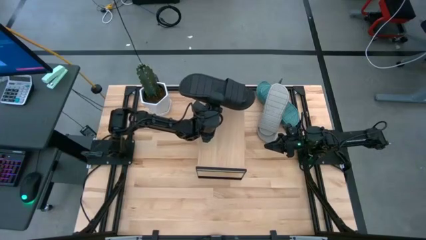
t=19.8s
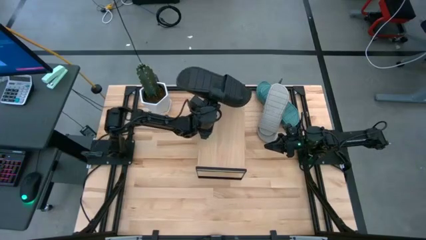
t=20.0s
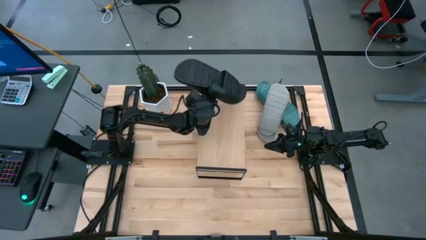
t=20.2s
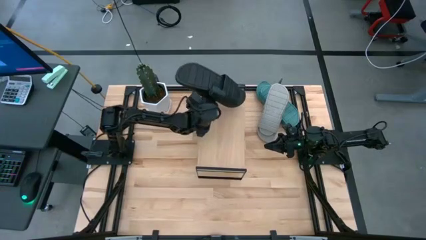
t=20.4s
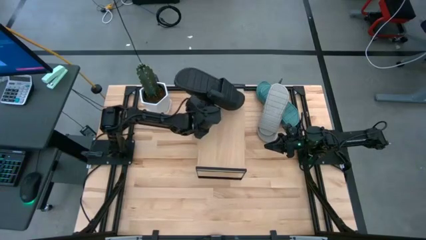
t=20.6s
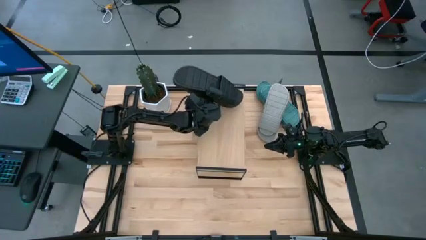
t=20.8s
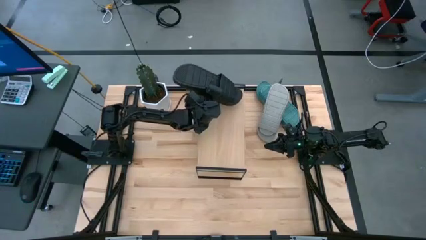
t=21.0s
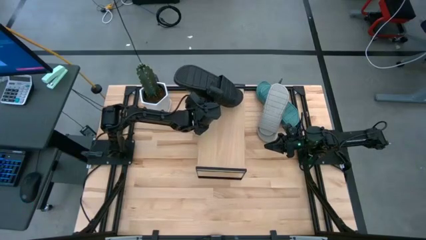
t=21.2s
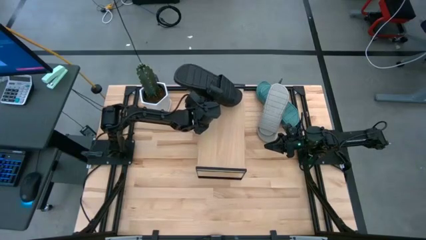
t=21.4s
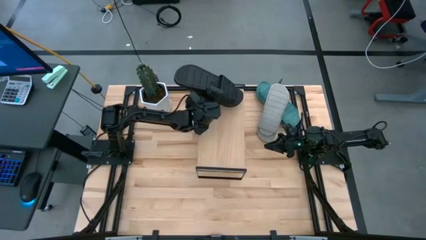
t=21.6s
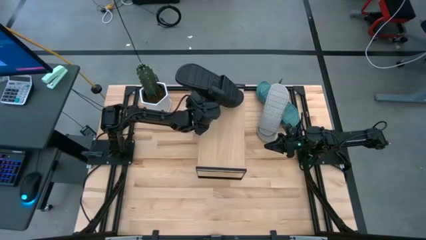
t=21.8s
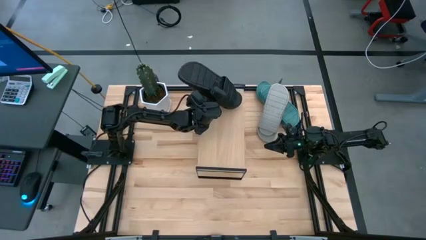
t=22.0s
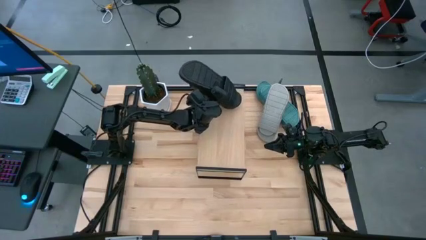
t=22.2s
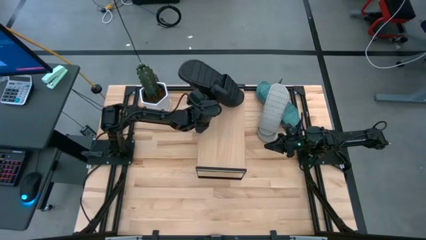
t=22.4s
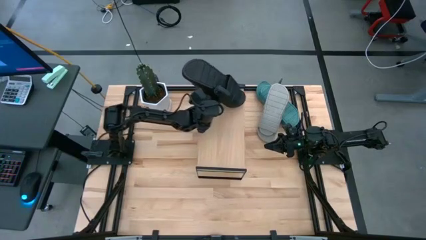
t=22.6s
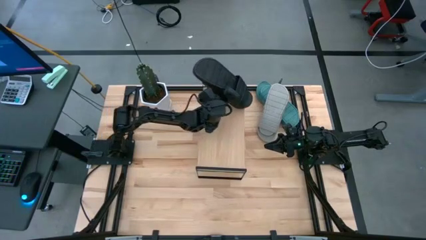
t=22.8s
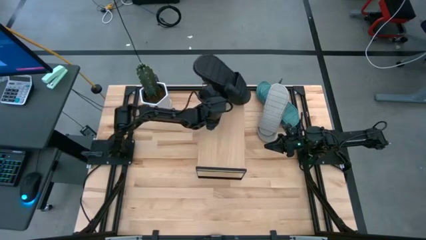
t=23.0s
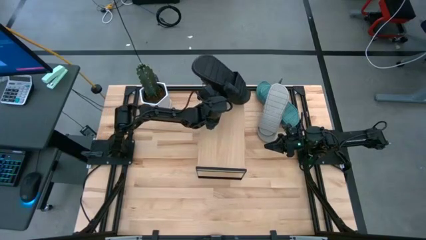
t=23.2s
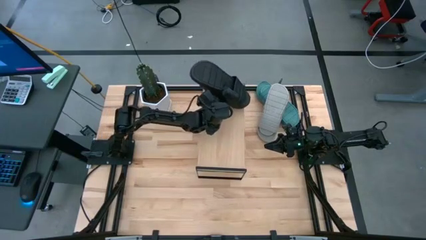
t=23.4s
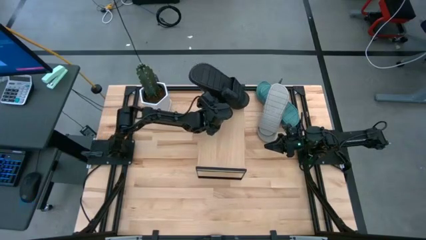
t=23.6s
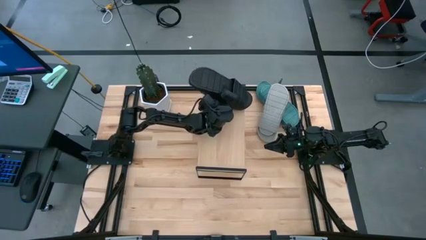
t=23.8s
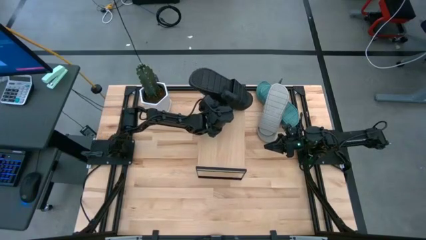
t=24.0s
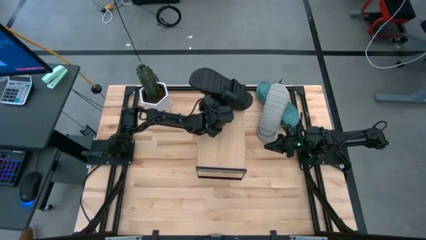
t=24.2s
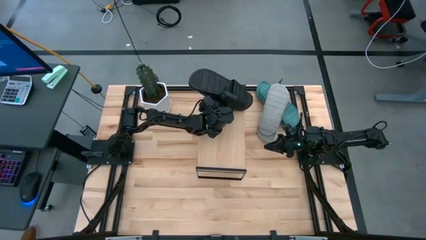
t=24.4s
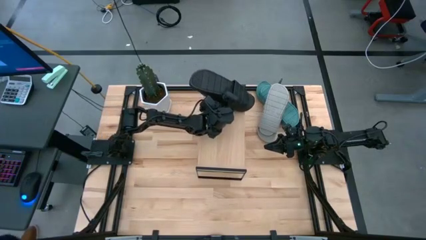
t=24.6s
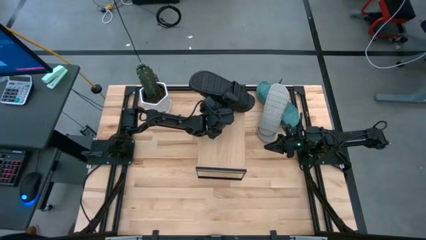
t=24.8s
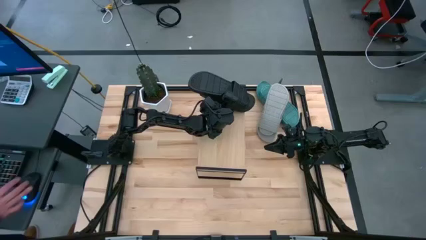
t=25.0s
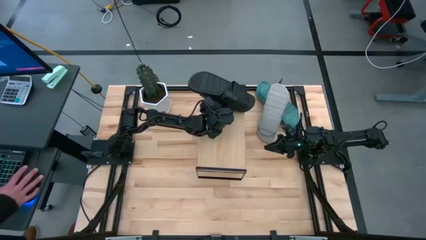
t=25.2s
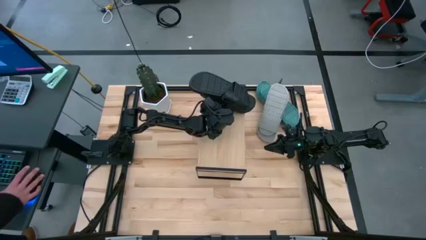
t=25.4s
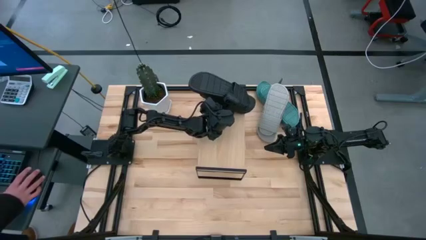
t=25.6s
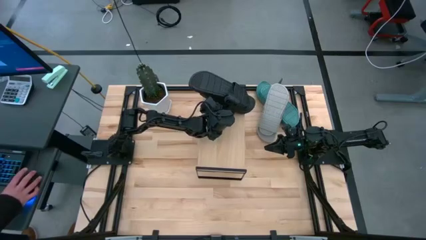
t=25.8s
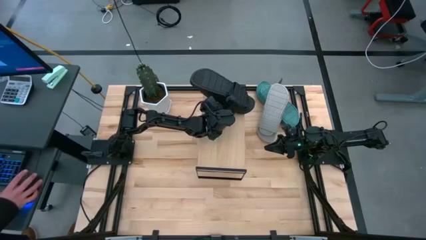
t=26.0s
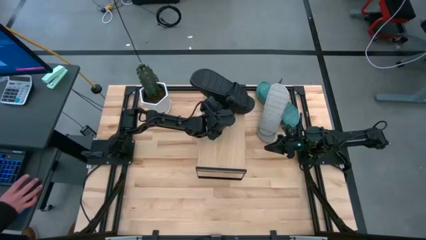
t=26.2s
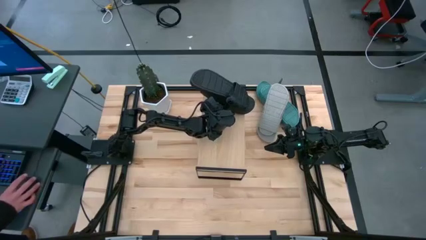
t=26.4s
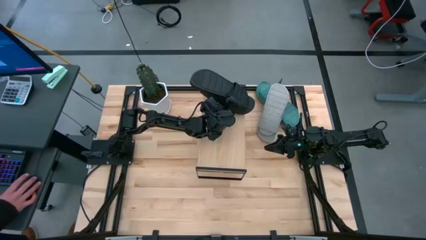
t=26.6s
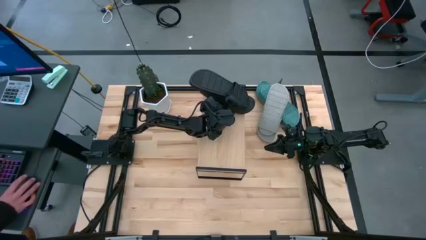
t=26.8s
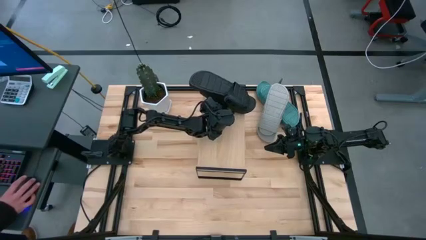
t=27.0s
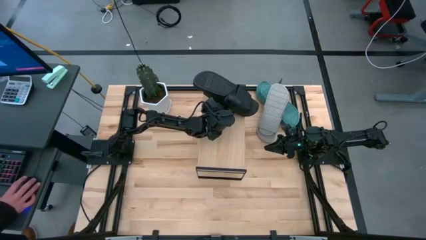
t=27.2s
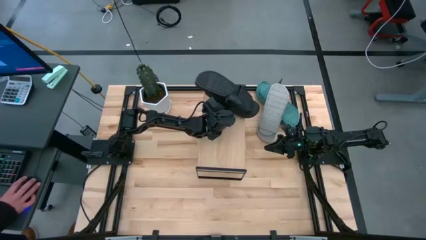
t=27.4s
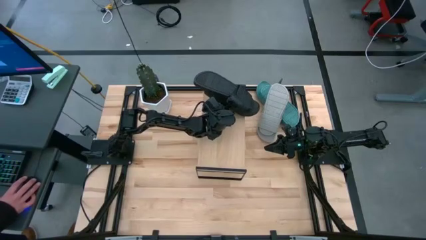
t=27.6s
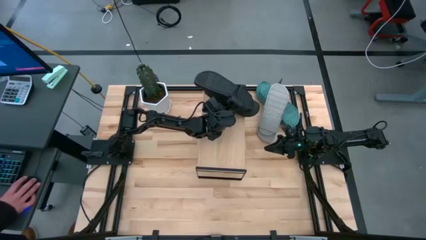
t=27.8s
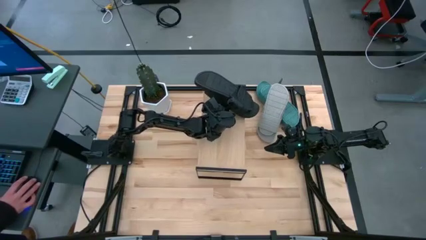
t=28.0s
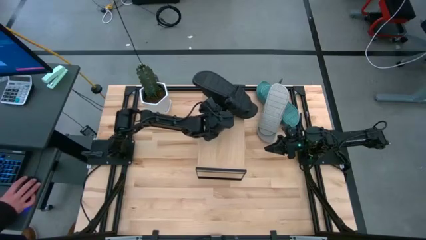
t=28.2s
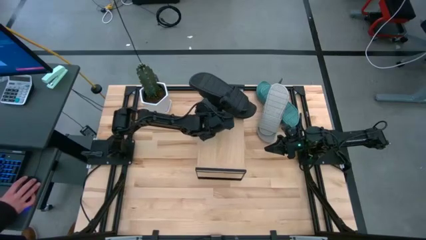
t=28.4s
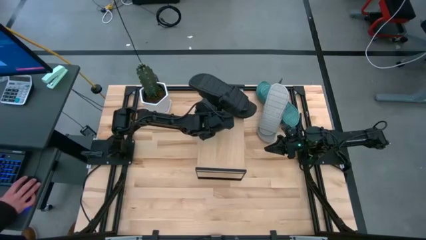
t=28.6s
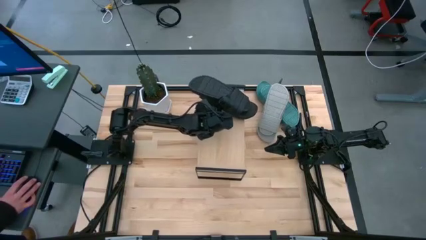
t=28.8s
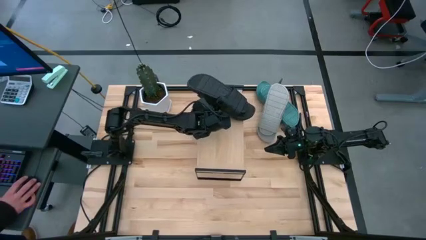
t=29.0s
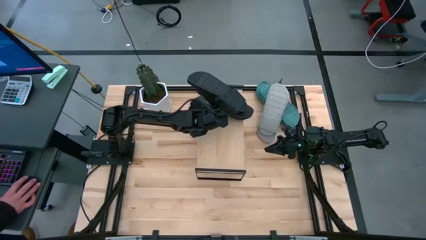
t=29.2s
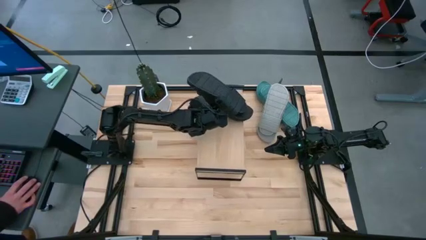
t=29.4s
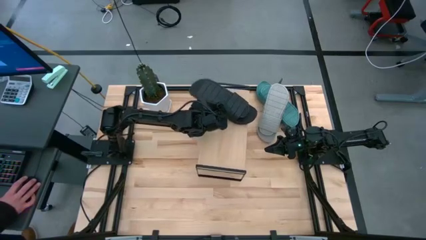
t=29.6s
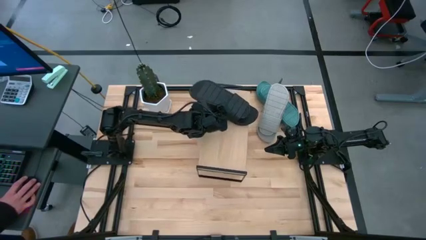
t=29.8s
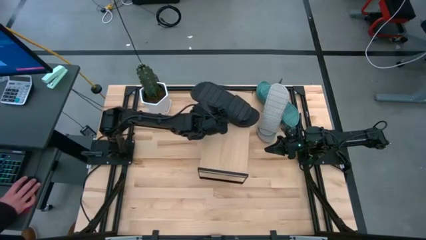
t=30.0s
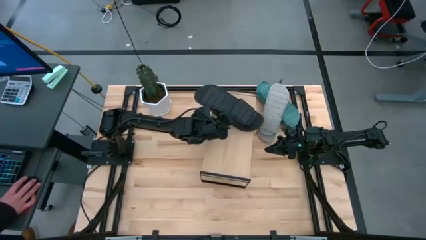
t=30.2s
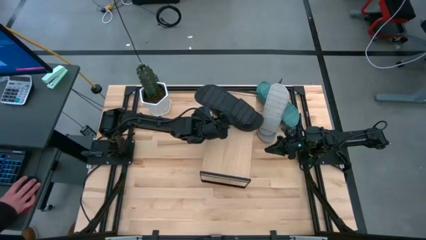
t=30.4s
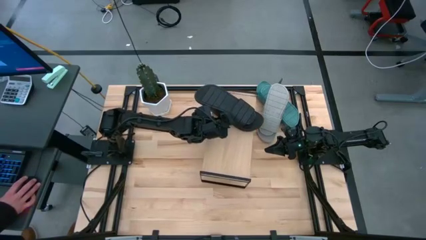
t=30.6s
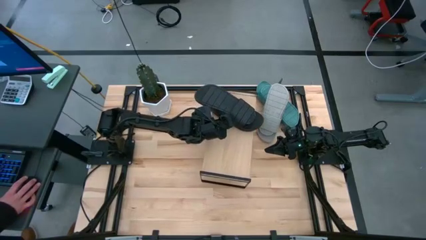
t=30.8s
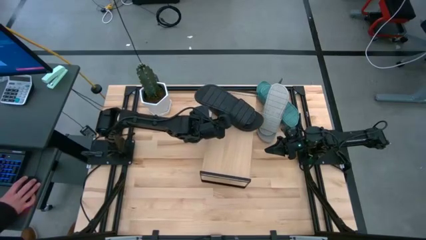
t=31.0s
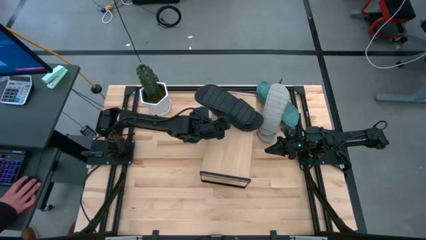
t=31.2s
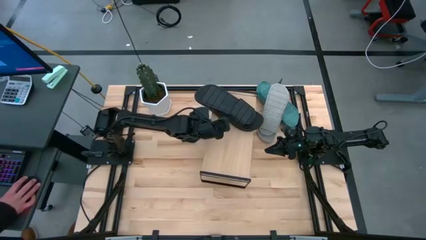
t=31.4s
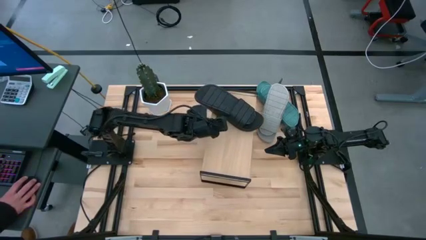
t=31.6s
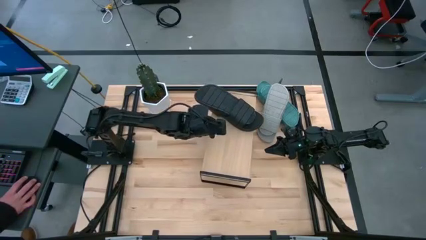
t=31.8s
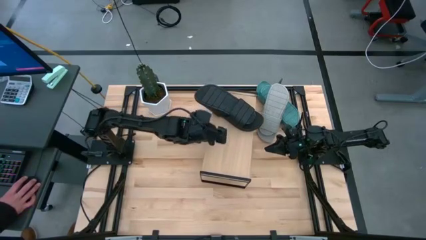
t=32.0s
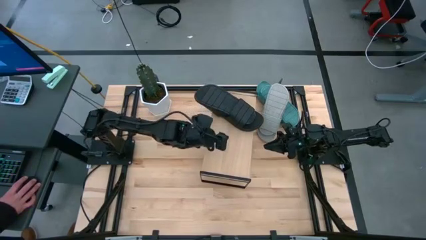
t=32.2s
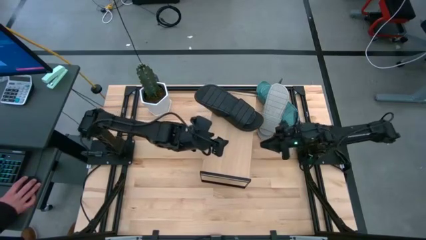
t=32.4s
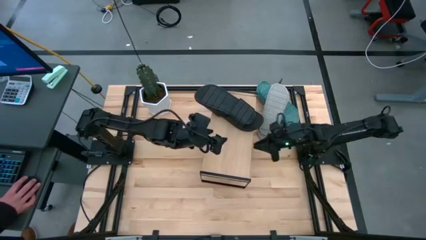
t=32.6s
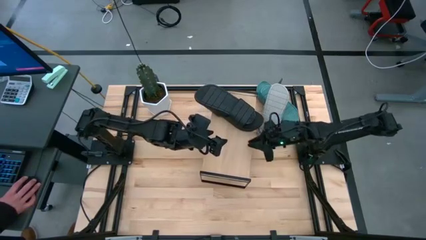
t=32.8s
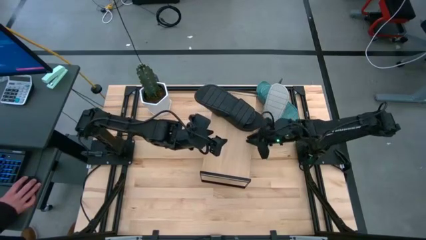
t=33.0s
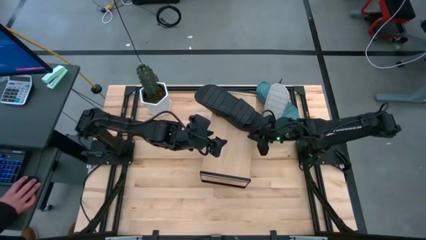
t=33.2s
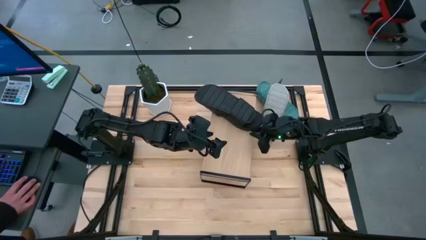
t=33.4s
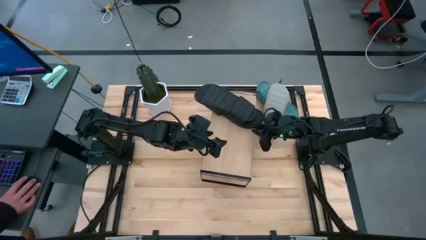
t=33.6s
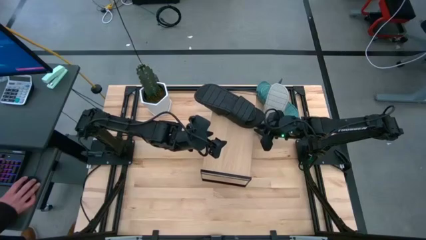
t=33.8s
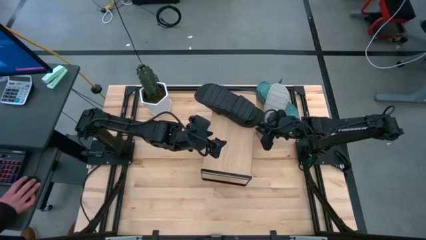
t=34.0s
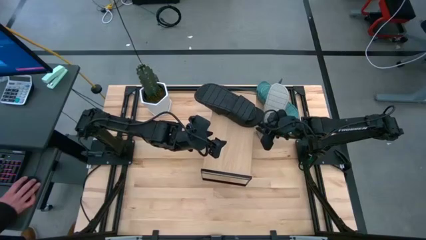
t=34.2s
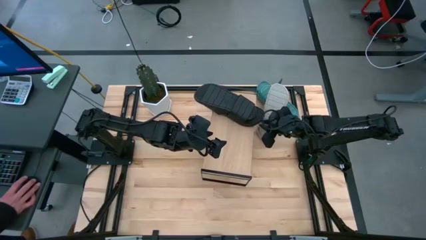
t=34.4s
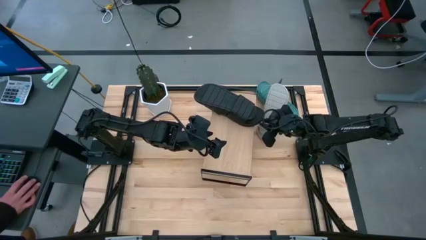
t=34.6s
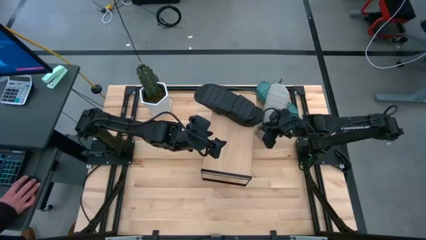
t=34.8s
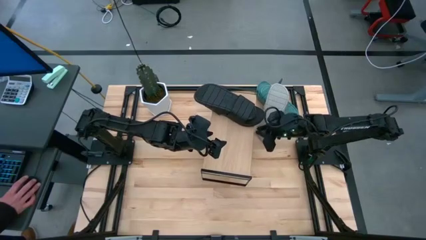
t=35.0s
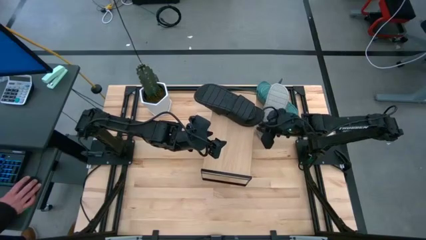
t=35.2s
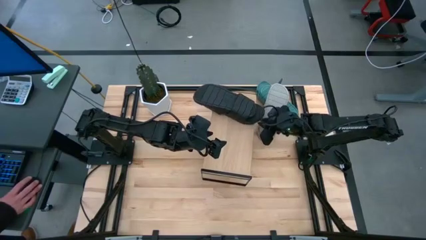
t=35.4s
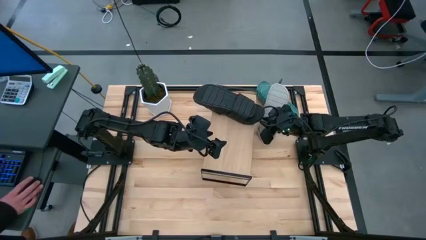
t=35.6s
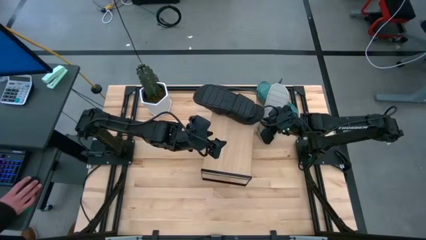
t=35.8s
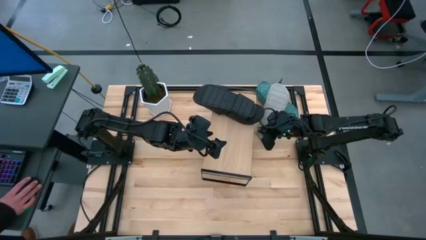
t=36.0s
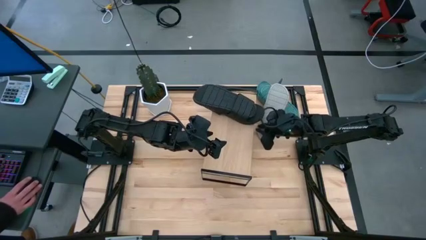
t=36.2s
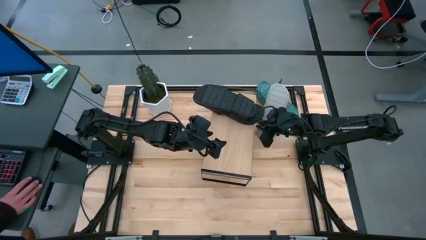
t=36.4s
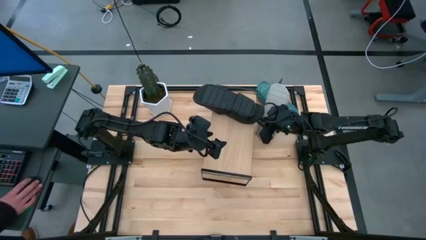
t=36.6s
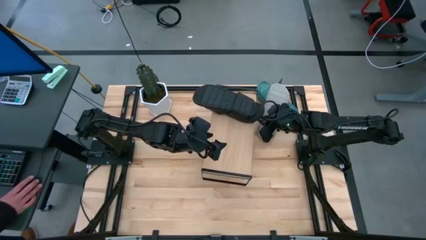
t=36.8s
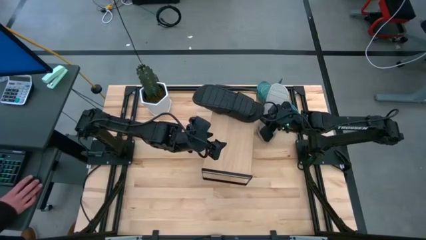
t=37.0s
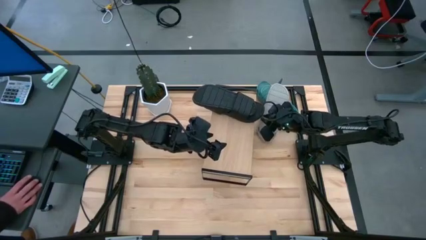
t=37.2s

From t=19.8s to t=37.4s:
Task: Pick and place slides into the shelf
Put the black slides on the shelf
